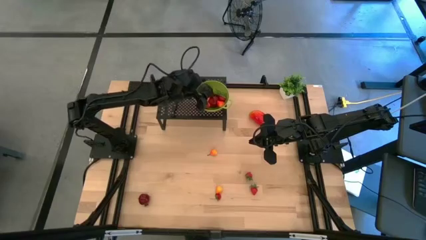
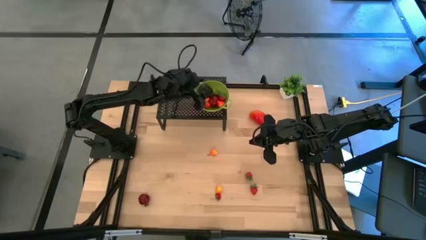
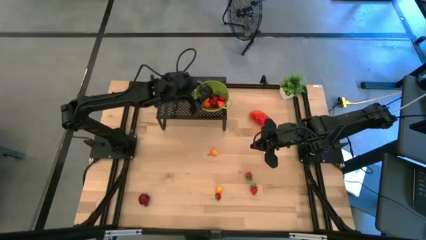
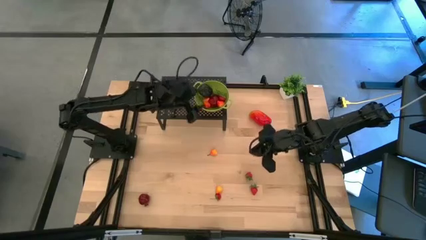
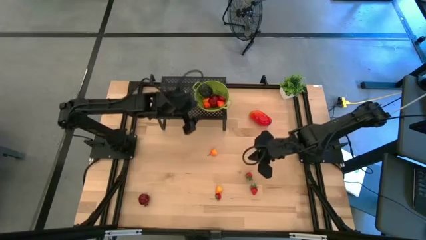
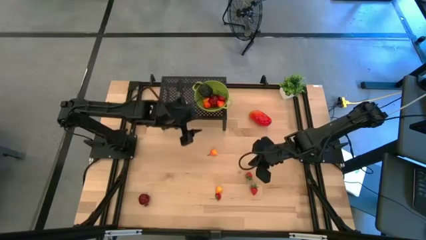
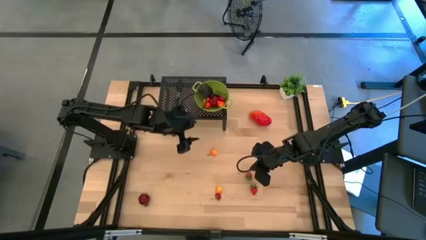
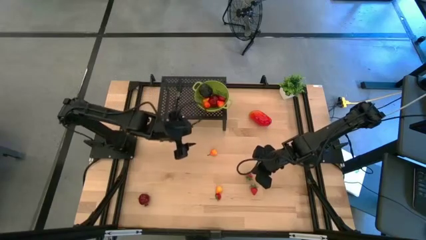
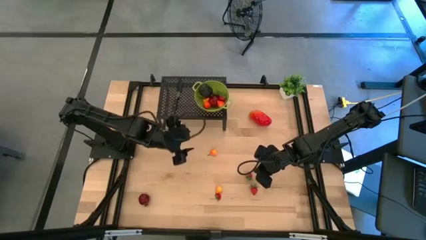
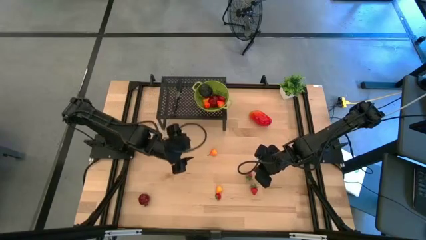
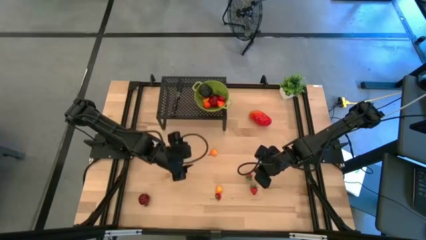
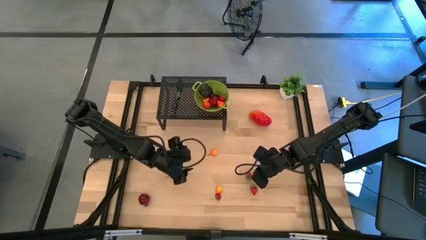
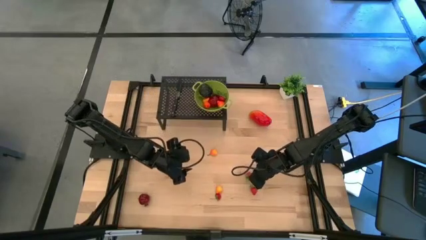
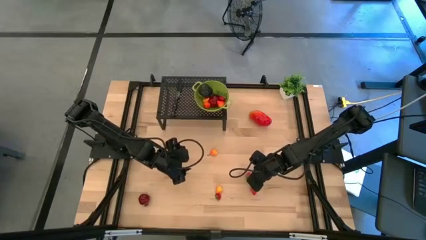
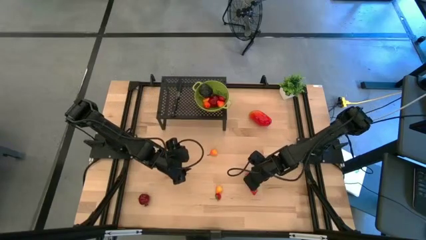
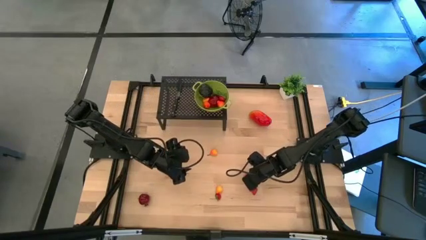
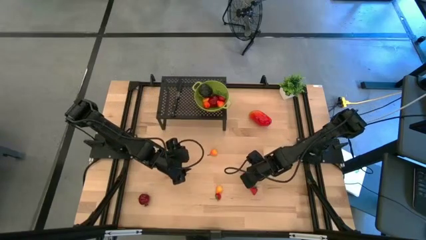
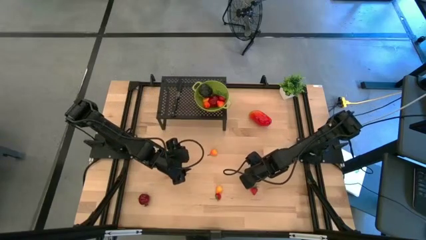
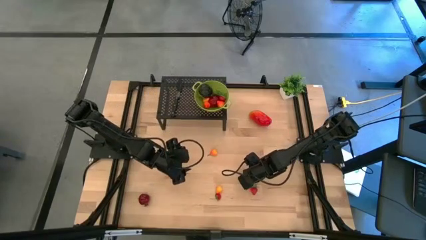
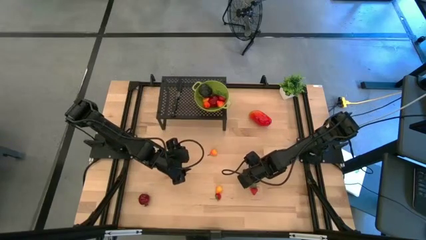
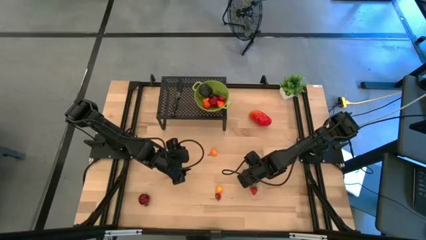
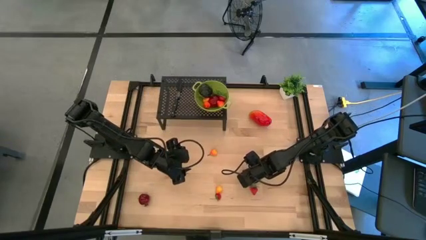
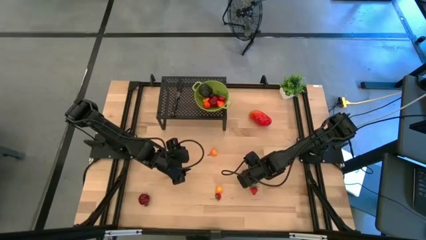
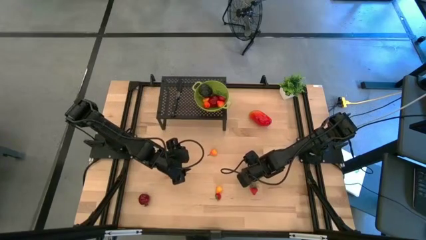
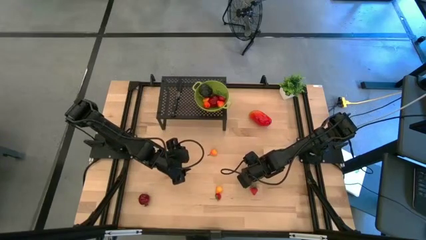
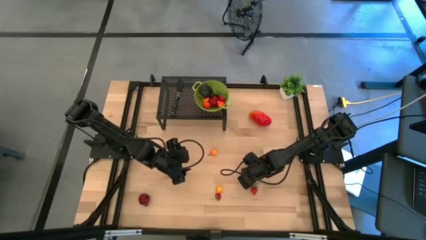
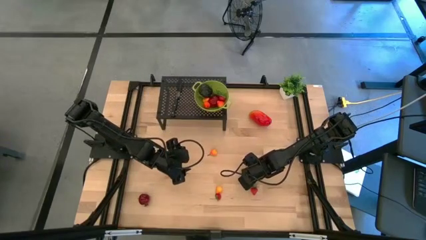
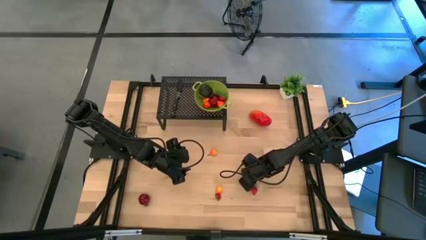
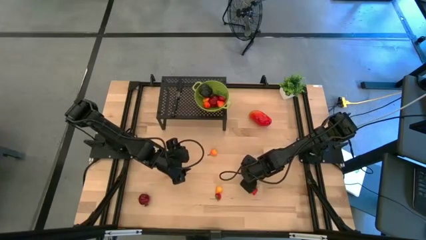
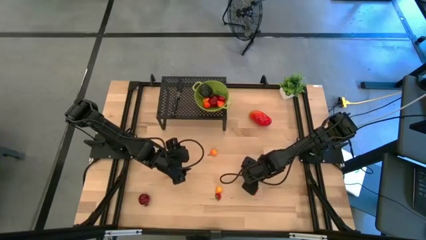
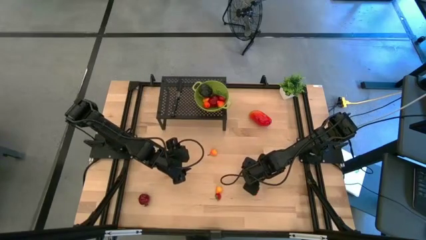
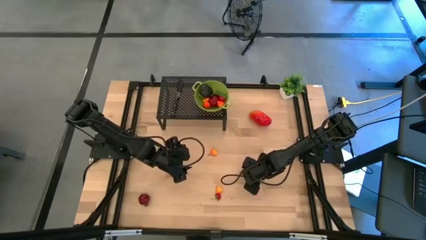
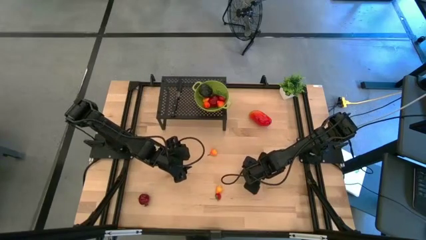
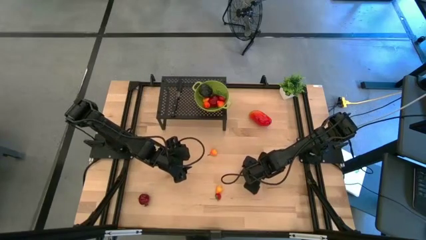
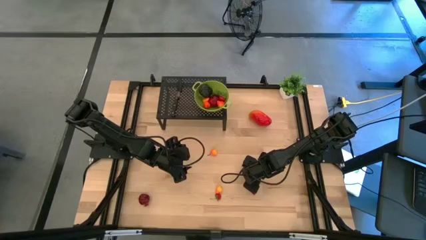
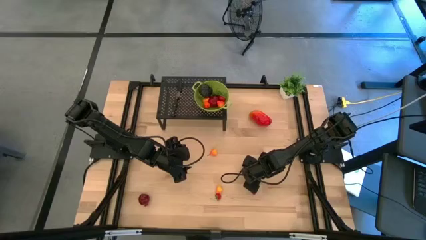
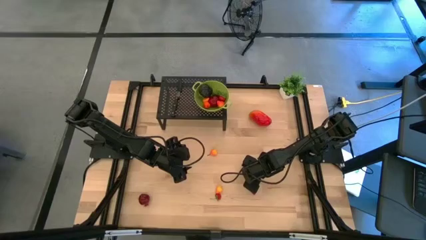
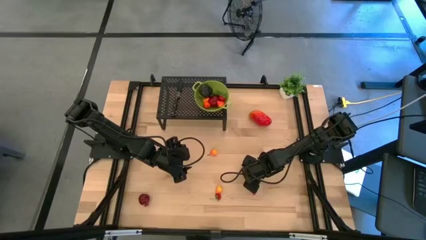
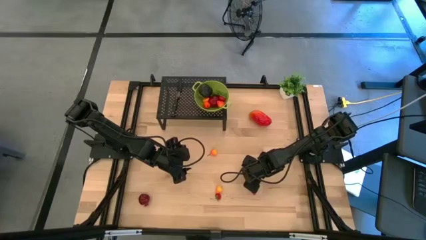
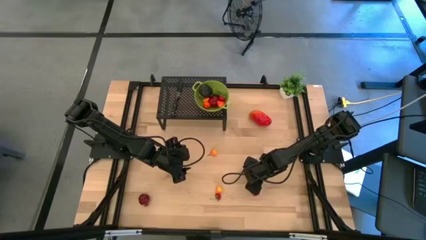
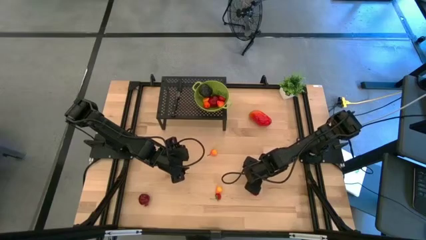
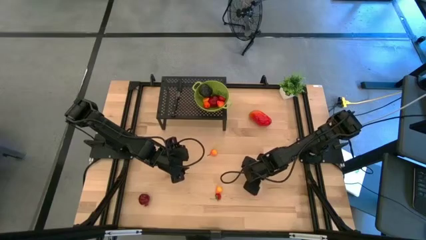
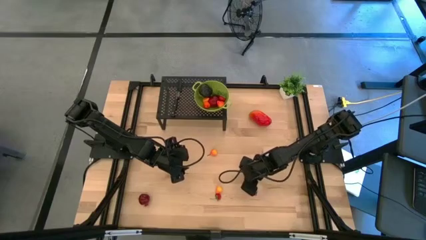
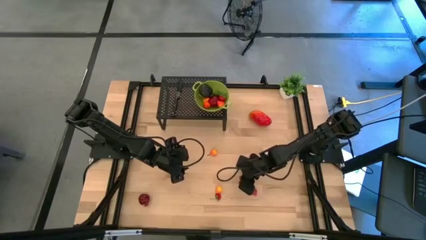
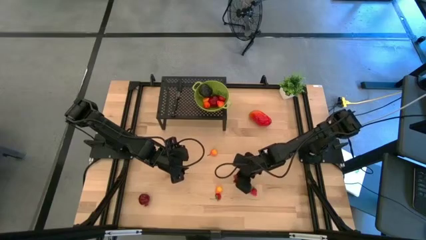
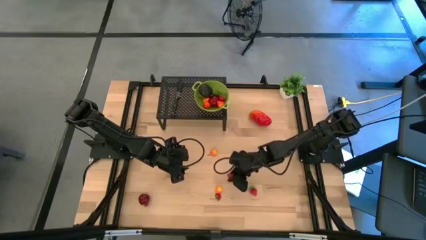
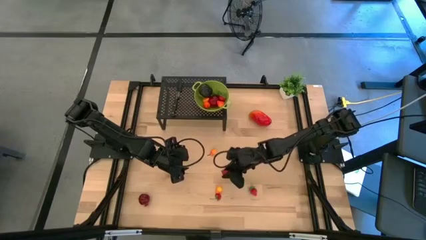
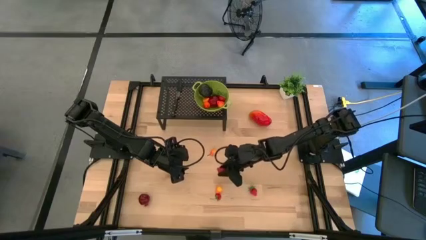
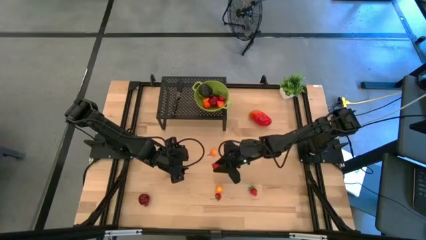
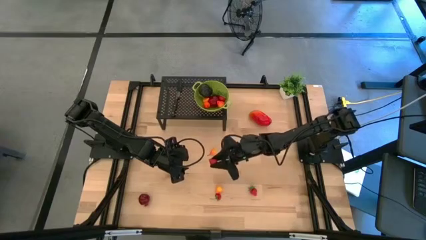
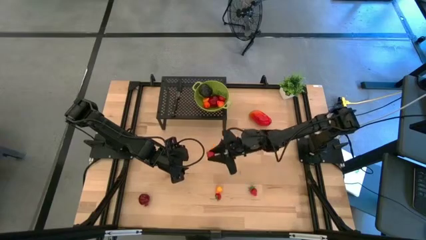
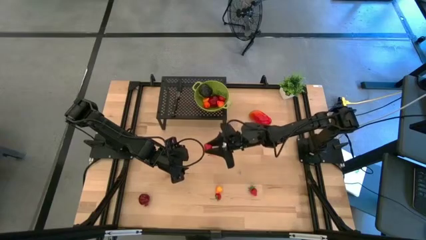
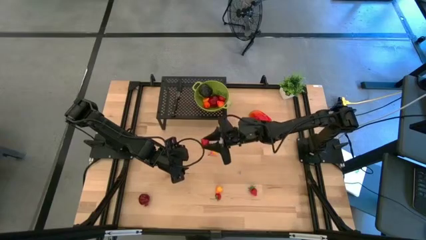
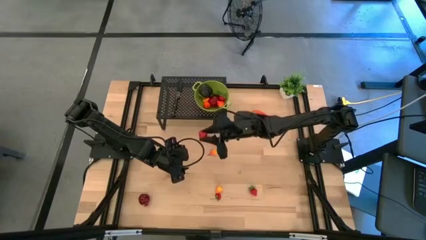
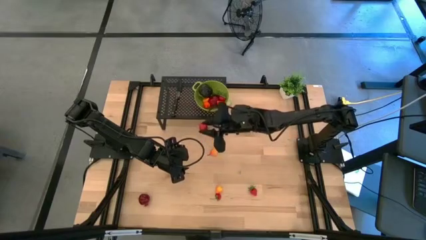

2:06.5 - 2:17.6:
Task: Pick & Place Fruit
Put the strawberry into the green strainer bowl on the shelf

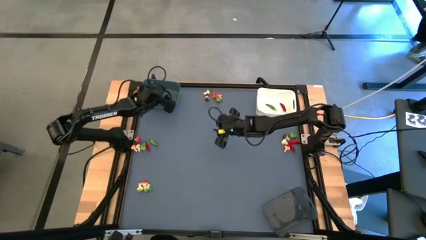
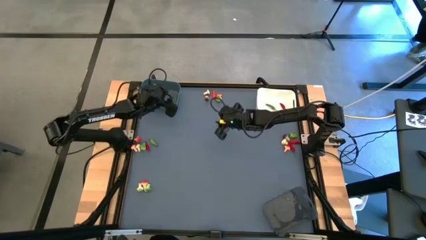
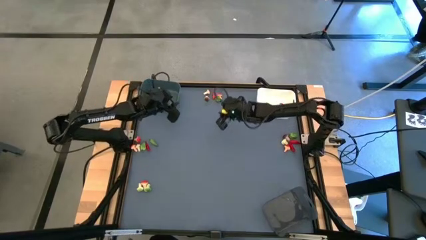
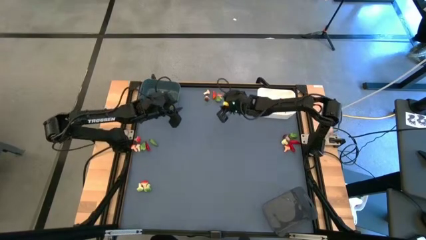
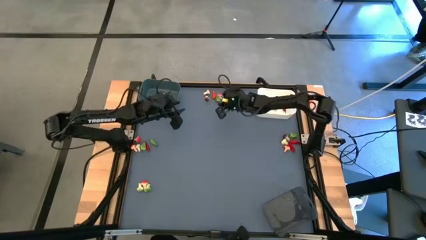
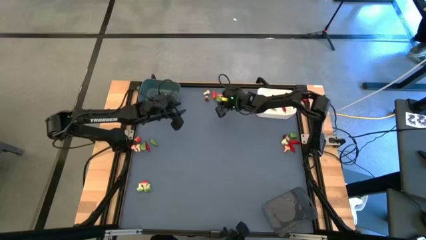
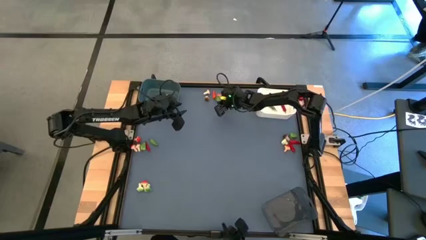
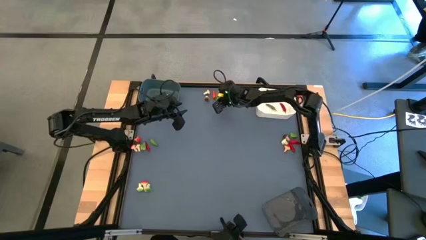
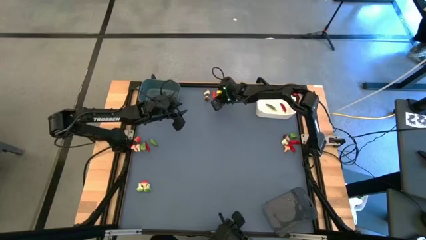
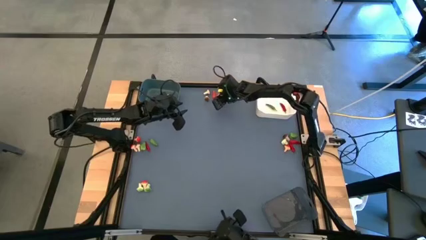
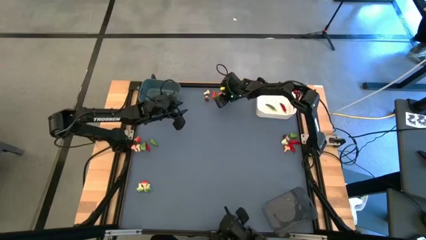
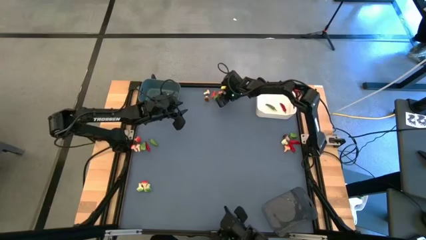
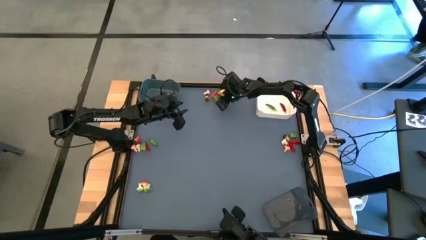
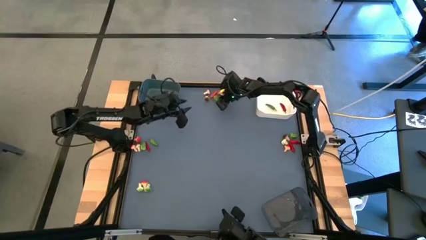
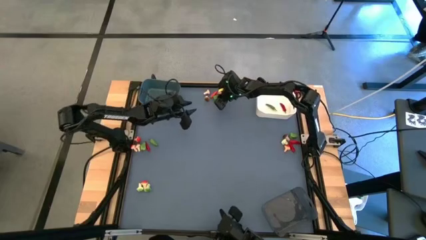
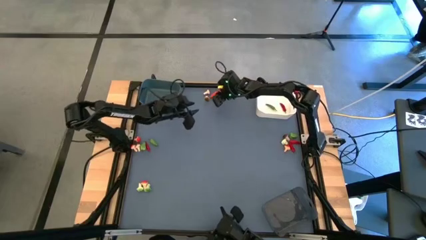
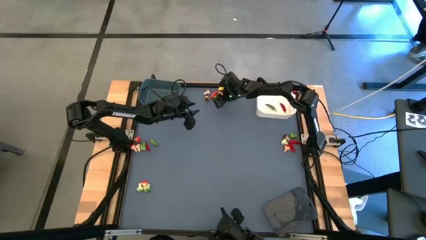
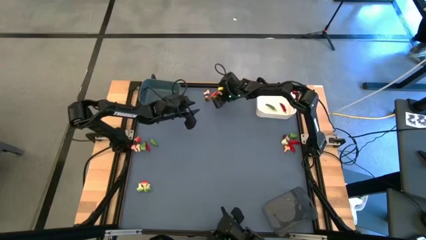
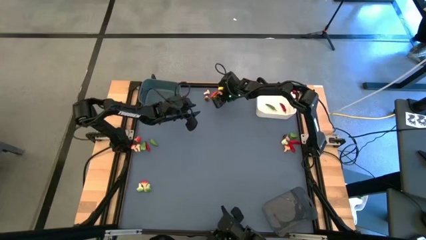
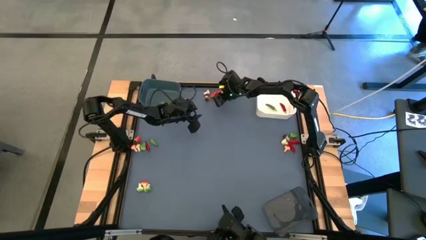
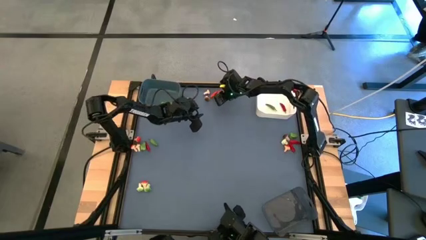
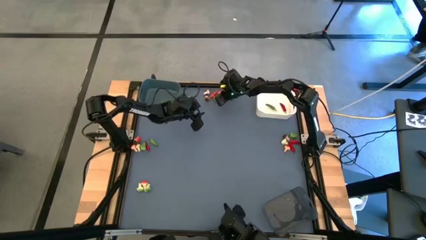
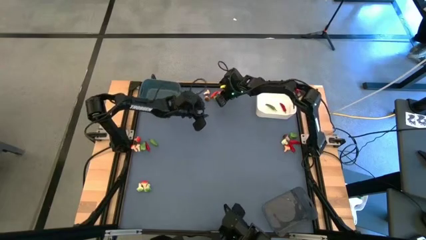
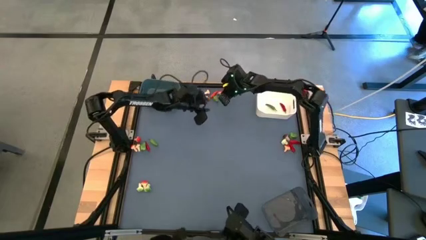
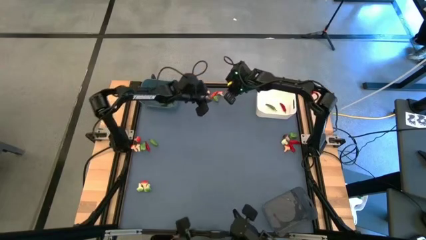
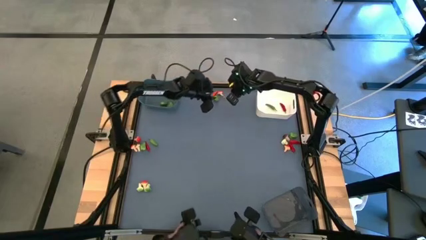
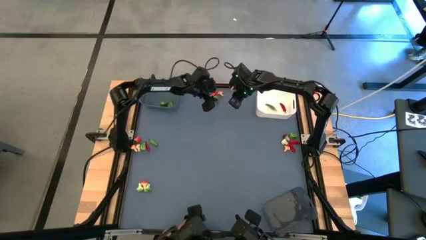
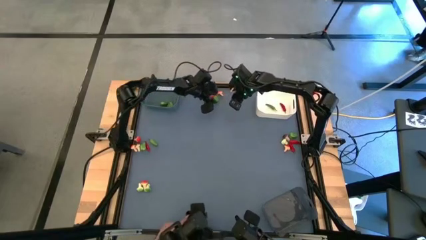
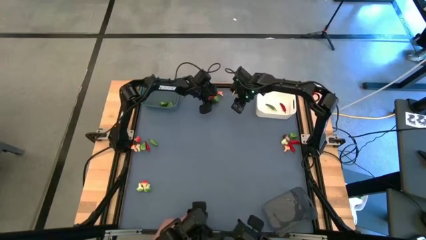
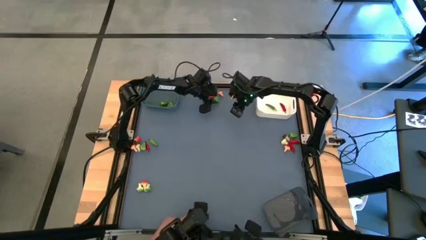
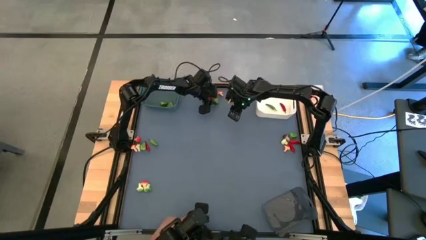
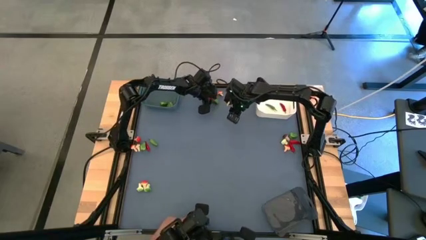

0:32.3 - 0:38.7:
Task: Sort produce into baskets
Put the green bell pepper into the blue bin
